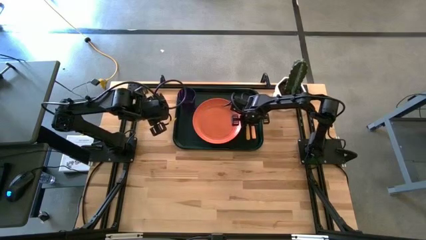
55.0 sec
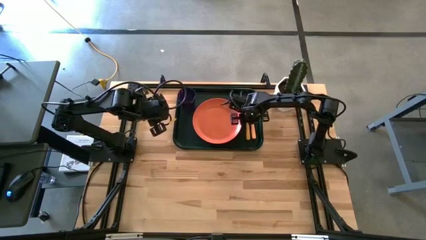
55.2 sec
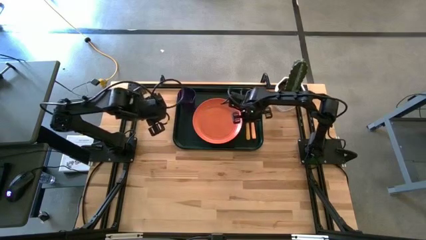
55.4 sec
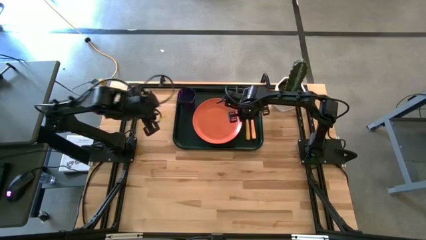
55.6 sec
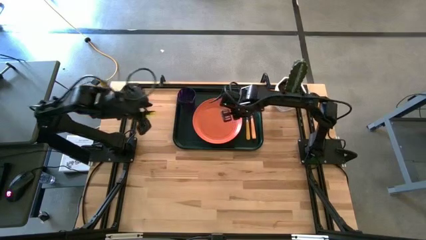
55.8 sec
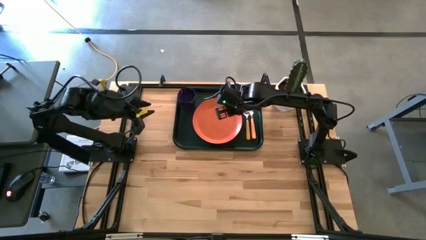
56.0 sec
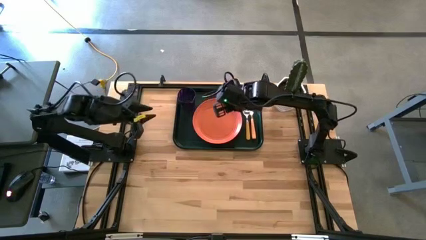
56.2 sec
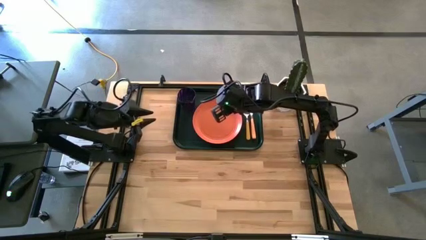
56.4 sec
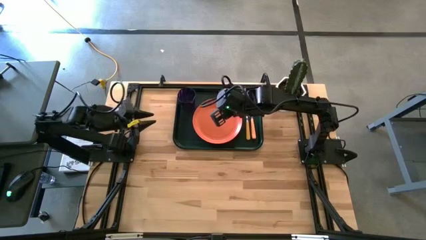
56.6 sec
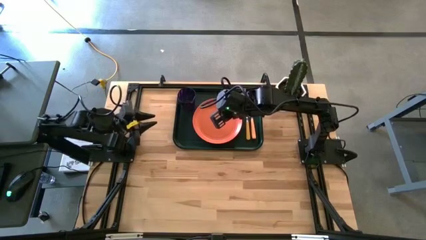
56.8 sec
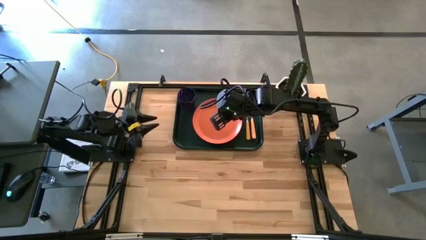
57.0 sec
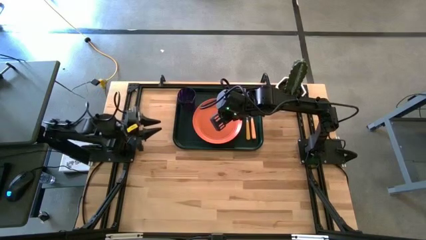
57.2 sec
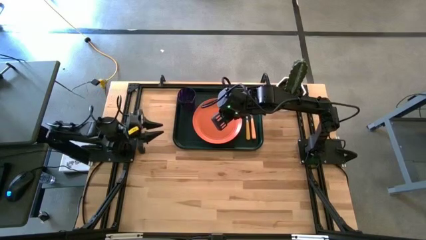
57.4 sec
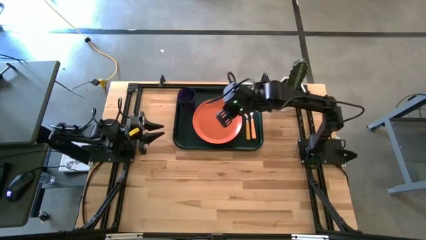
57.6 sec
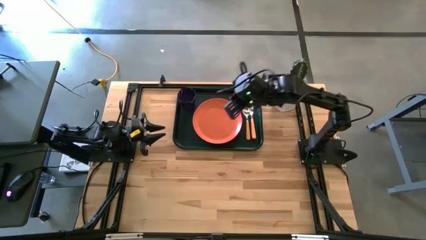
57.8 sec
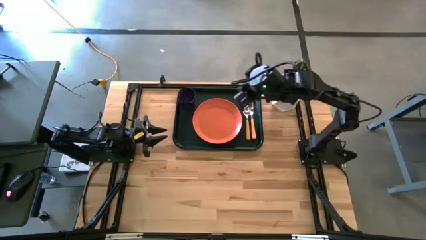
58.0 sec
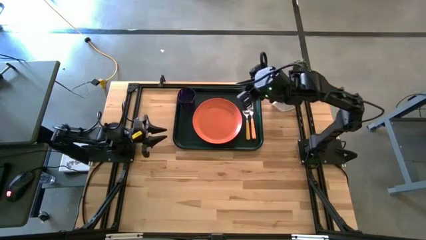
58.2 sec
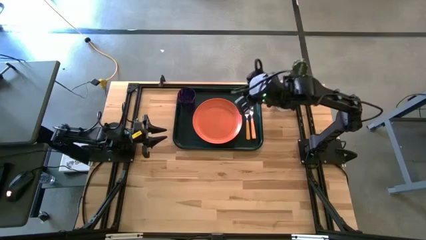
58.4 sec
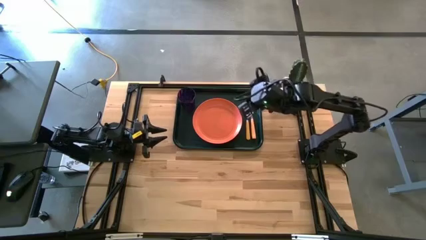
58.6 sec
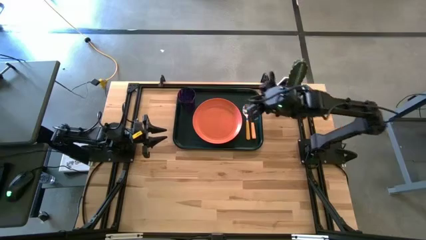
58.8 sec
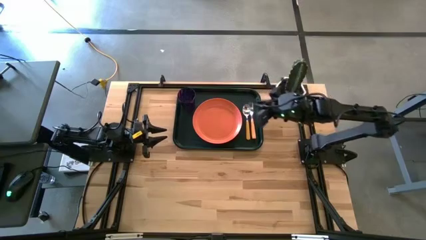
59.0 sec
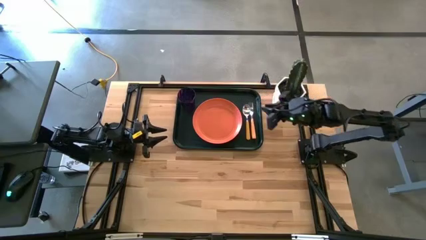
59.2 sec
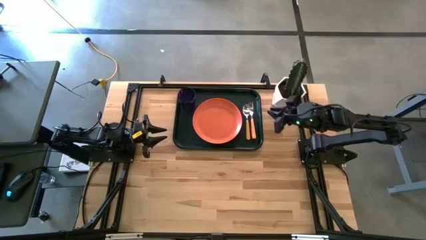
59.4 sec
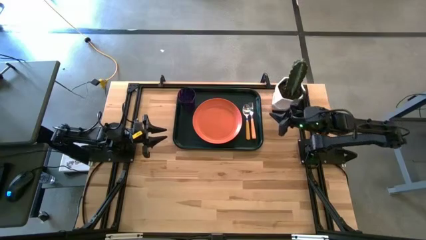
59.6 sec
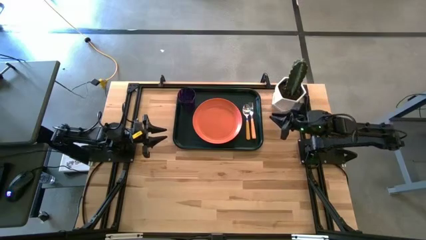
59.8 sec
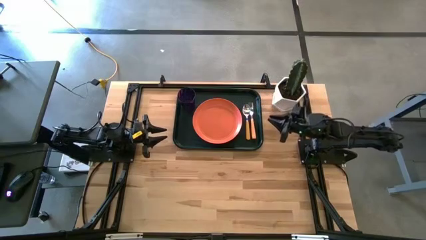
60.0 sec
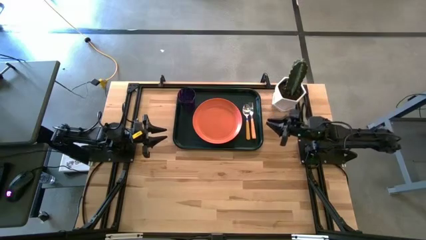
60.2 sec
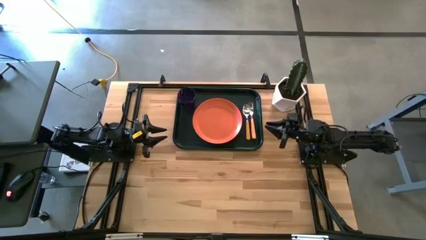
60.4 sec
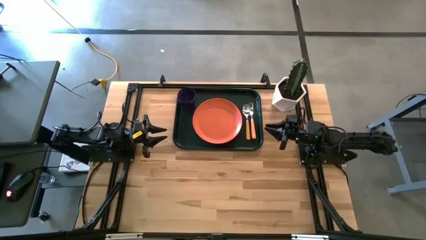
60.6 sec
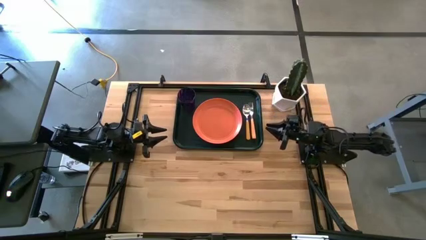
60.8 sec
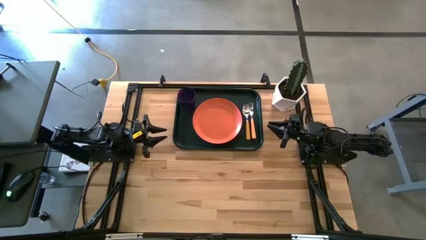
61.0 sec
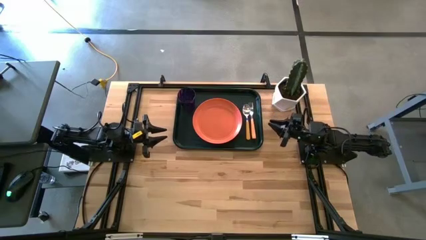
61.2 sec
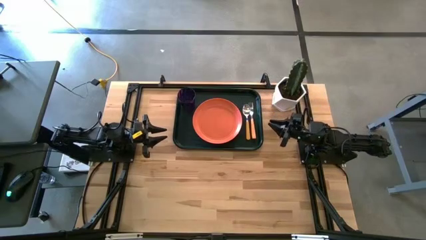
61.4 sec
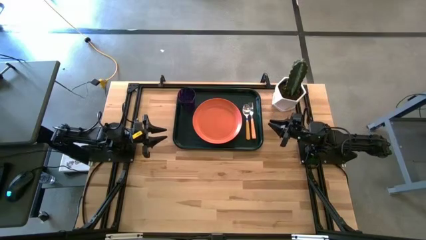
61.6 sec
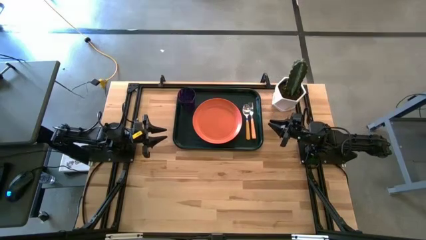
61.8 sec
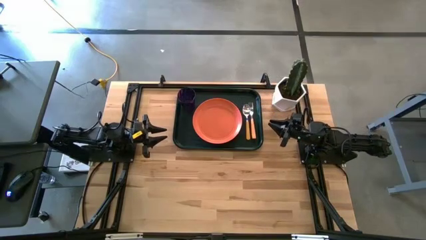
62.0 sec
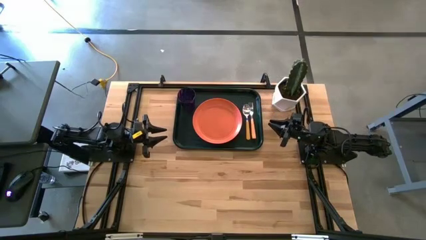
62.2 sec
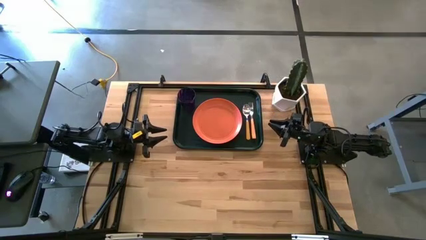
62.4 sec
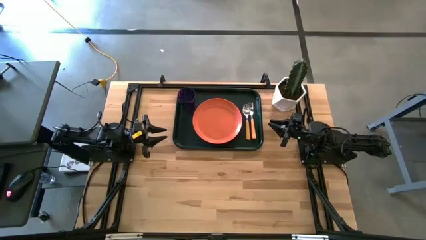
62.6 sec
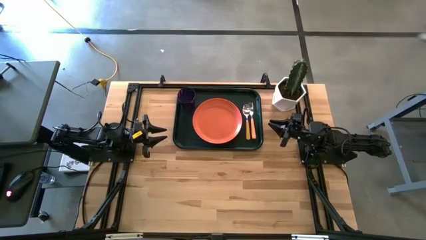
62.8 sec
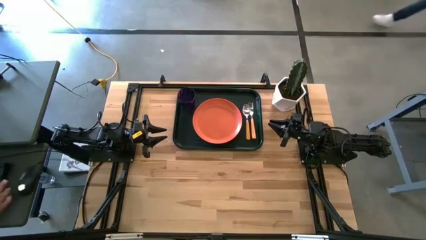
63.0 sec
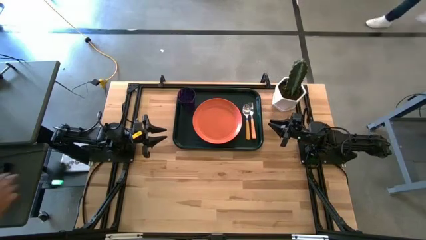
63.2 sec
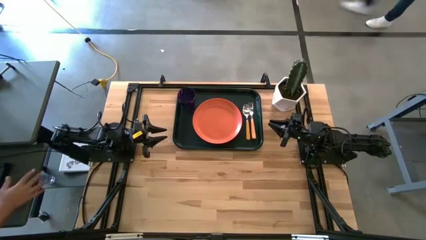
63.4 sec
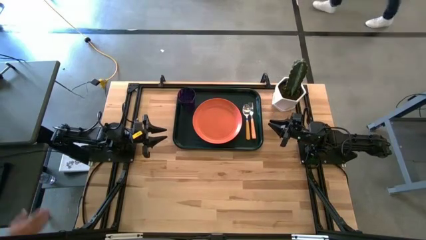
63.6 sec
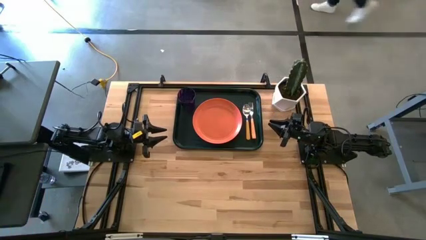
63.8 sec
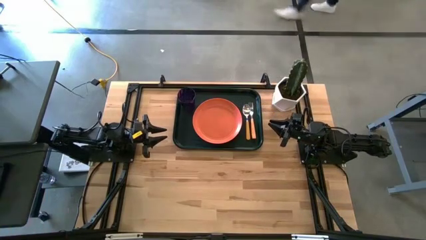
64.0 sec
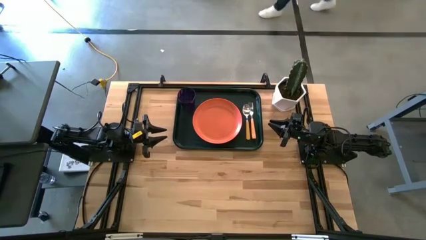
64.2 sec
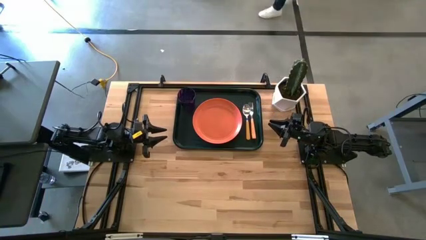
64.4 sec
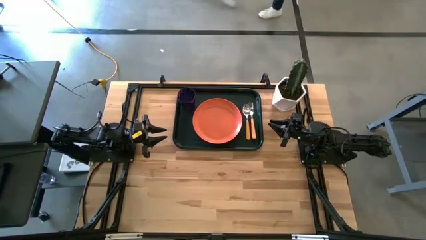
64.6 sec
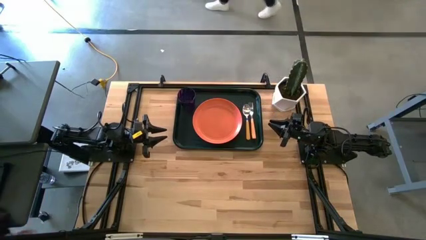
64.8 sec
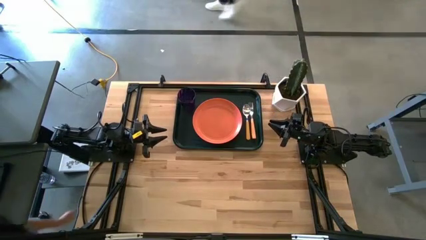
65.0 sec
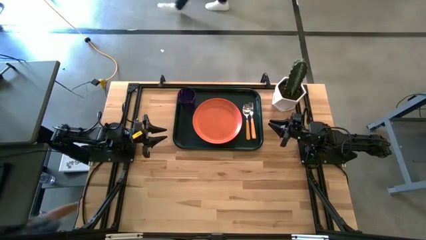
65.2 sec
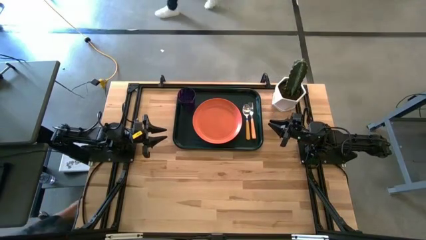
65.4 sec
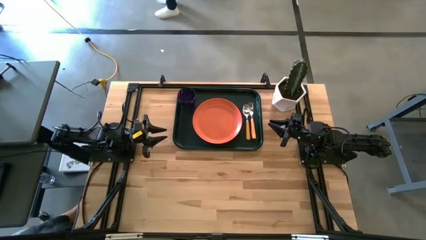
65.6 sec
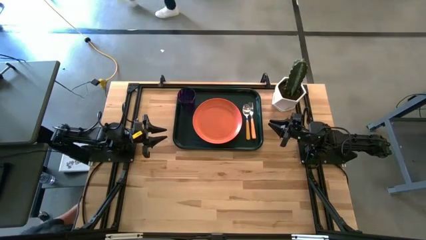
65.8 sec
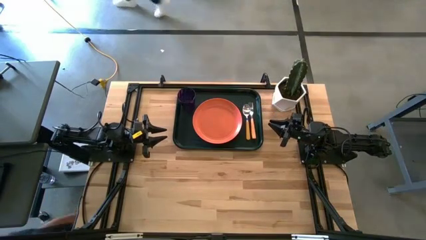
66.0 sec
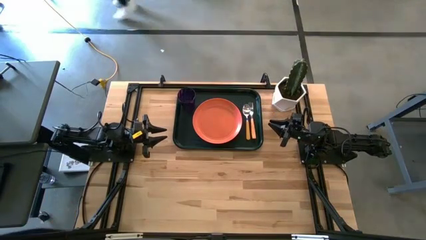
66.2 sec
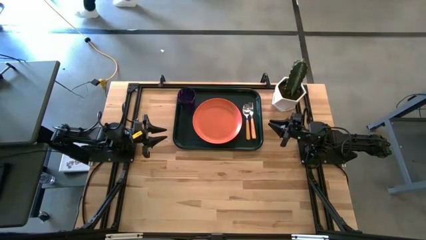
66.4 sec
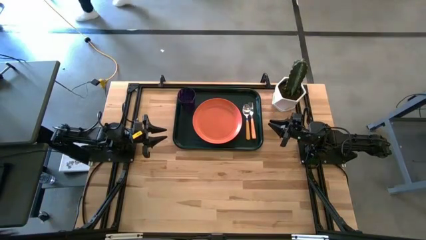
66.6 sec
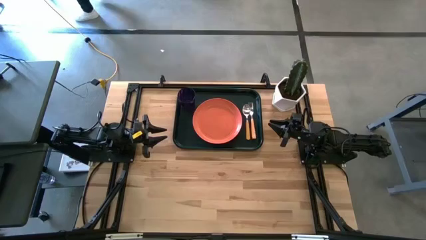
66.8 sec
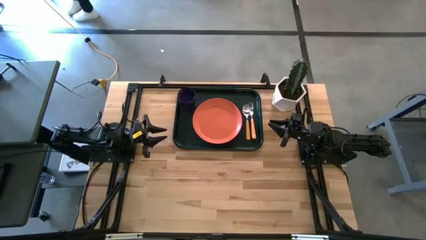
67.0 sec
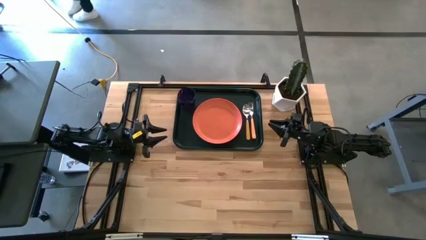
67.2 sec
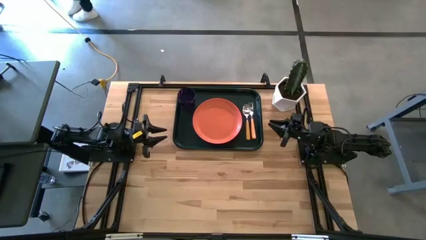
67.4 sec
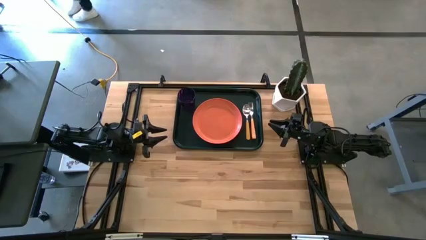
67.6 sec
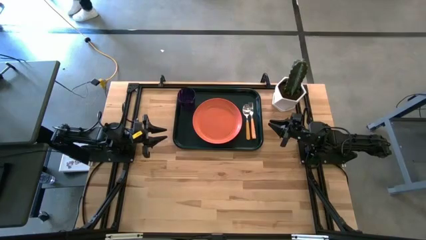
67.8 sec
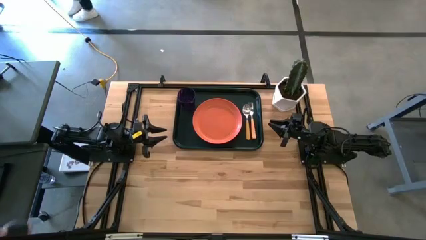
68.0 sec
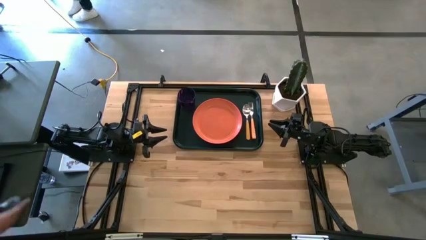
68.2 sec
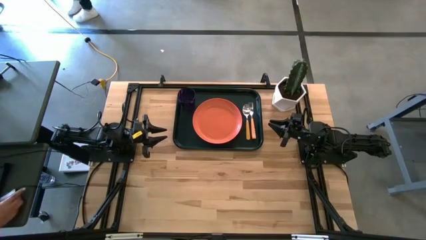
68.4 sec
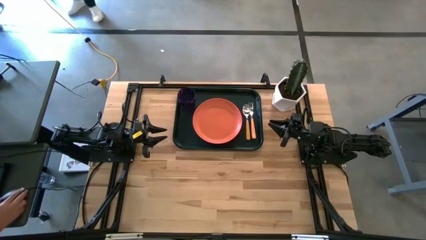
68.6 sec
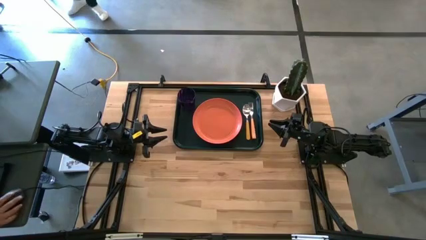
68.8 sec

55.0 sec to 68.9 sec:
Task: Pick and place plate/cup/fork/spoon on tray
Return to Home Position
